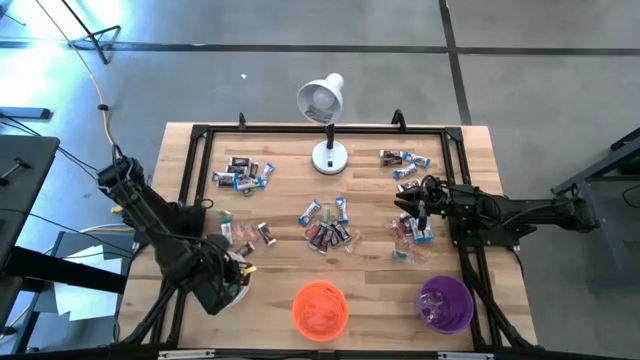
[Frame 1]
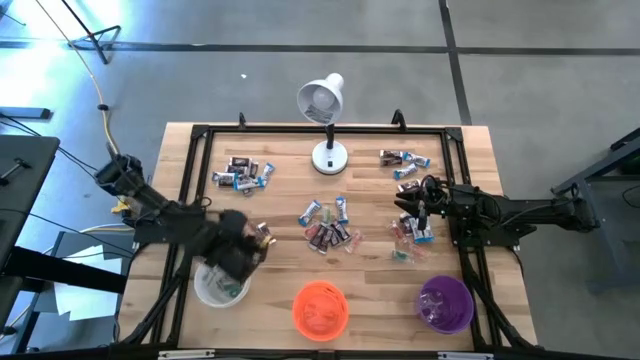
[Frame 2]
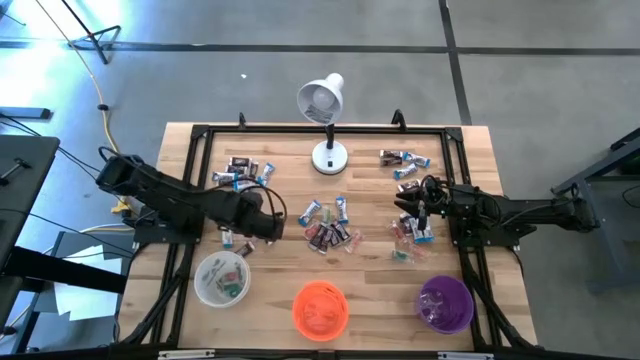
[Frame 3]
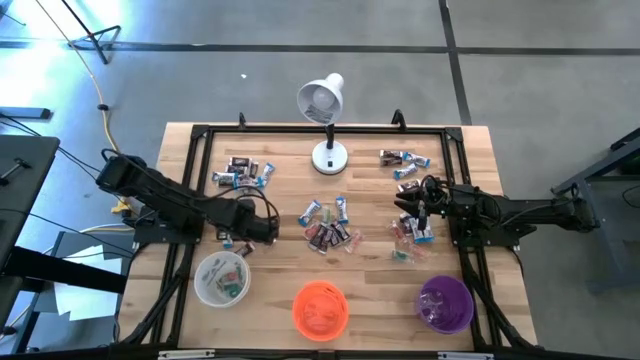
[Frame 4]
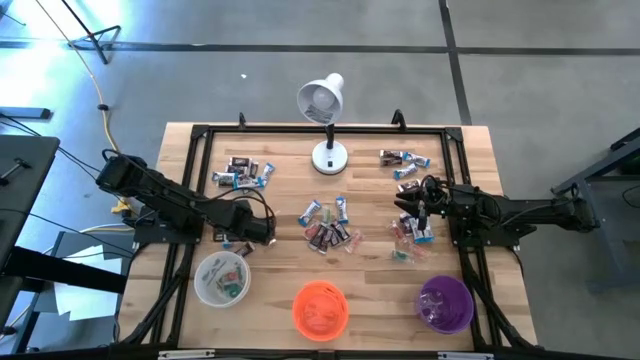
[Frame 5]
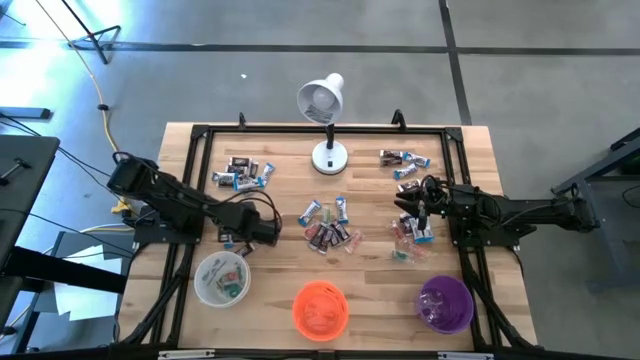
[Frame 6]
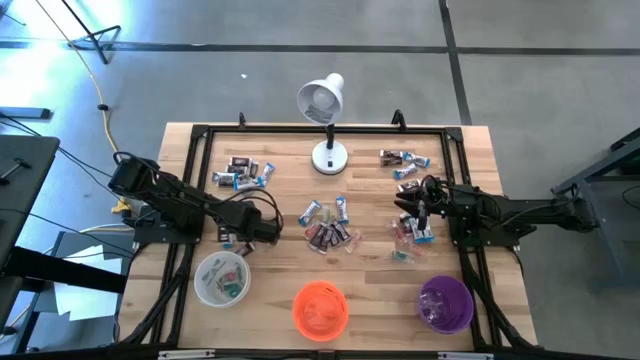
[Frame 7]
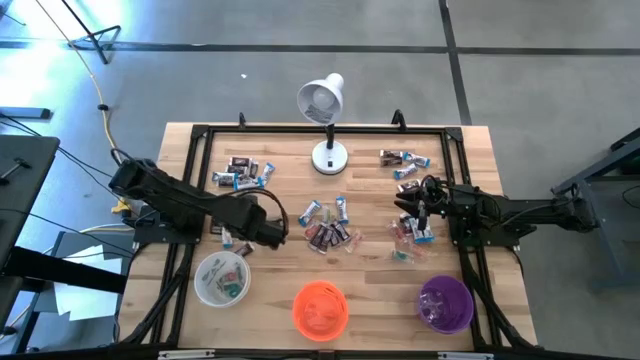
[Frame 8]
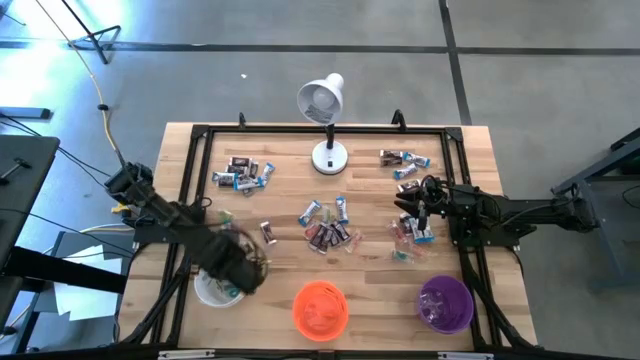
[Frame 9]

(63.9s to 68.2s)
Task: Organize candy in baskets
Put the orange gummy into the white bucket

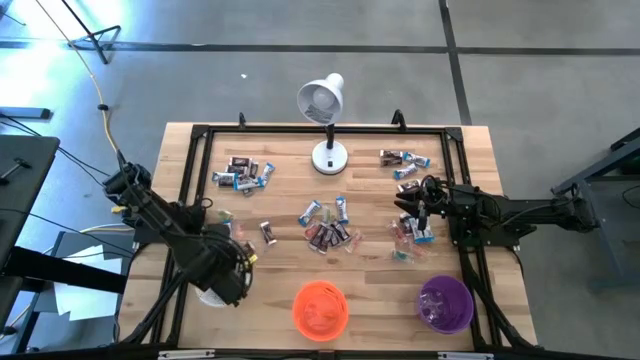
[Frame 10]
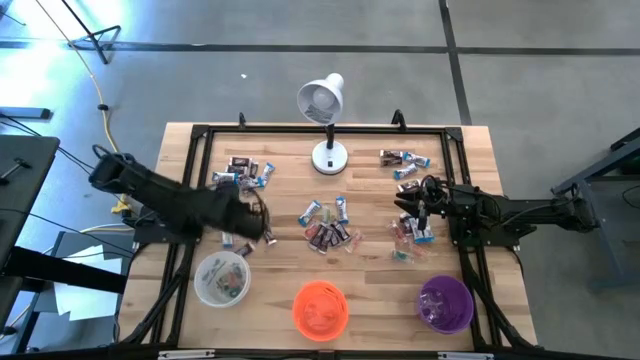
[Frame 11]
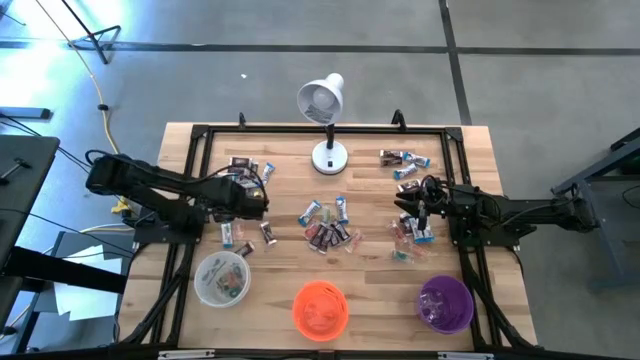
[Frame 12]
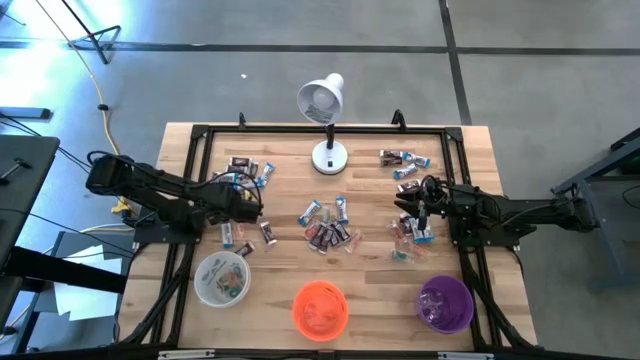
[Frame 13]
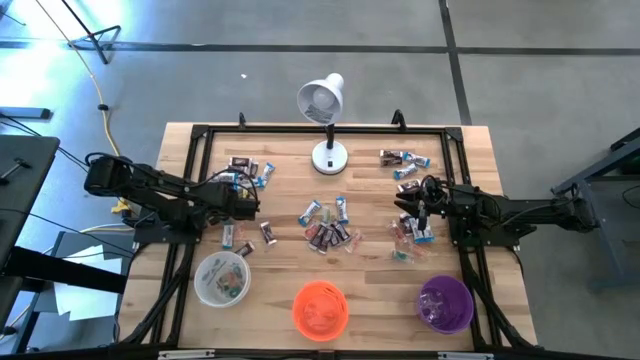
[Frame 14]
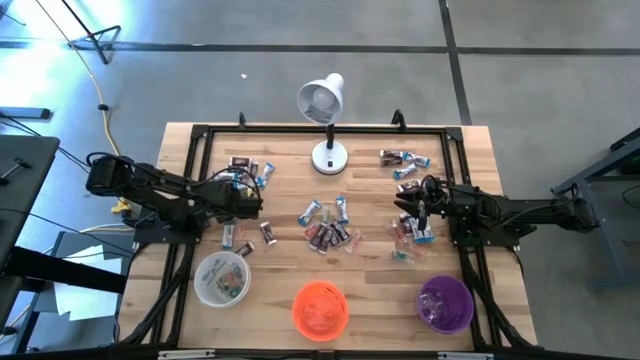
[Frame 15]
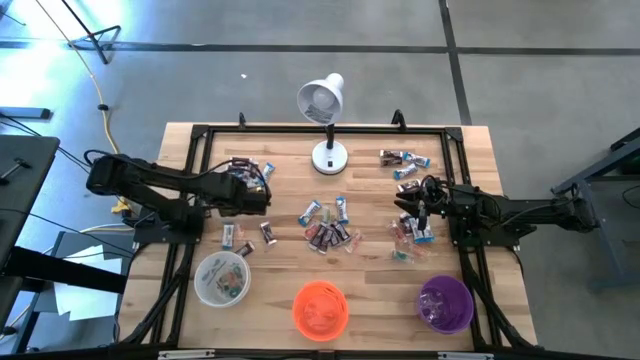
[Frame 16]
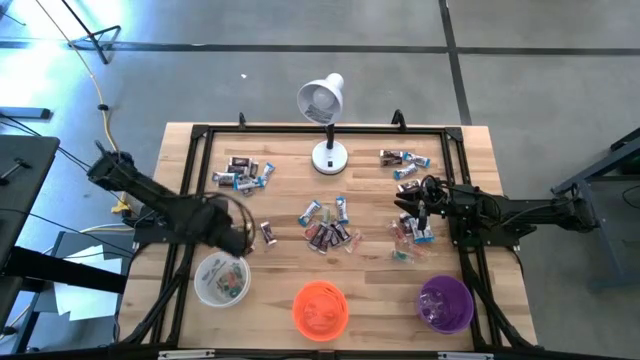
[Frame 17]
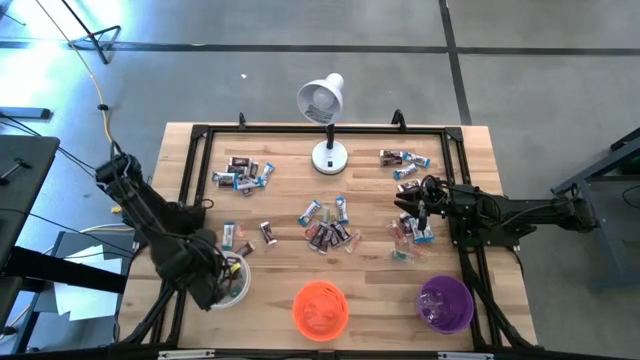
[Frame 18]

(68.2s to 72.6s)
Put the light green gummy into the white bucket

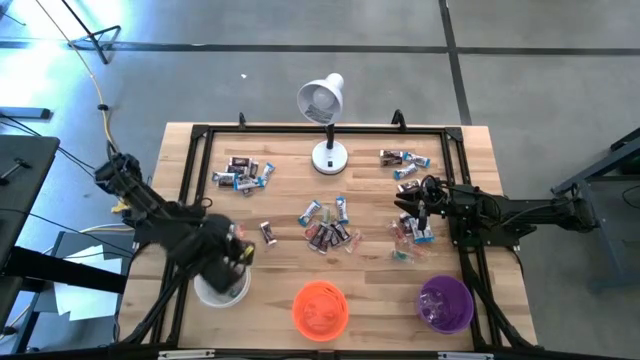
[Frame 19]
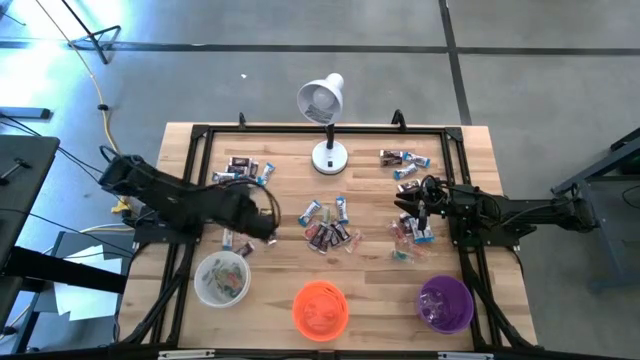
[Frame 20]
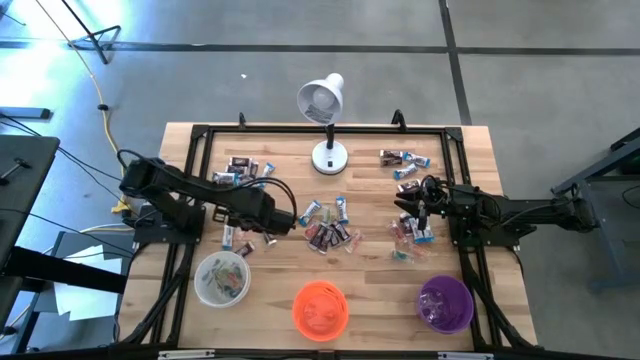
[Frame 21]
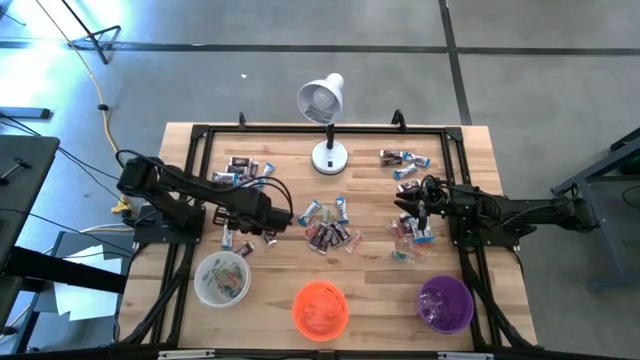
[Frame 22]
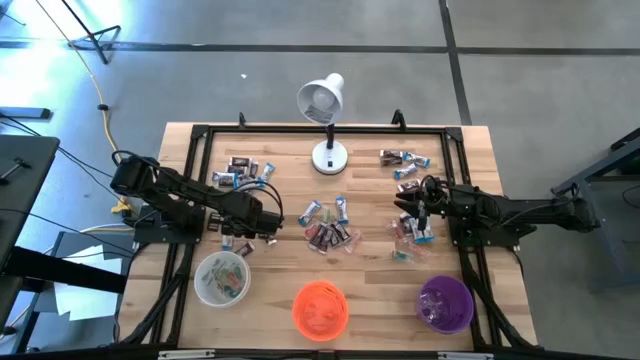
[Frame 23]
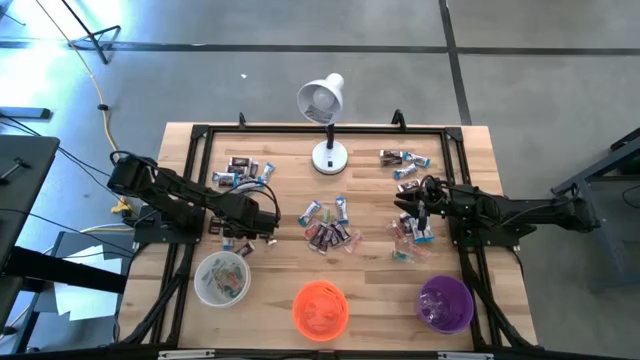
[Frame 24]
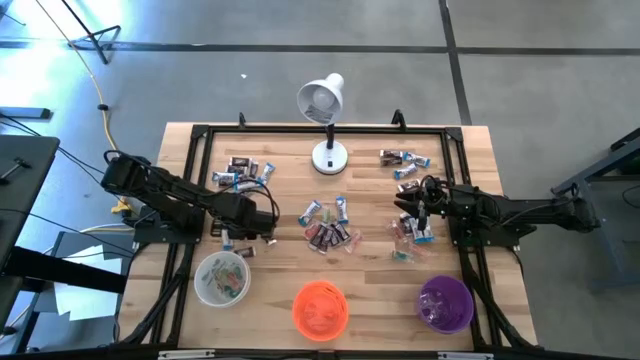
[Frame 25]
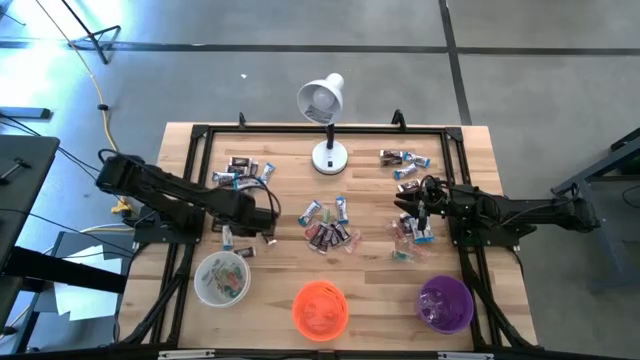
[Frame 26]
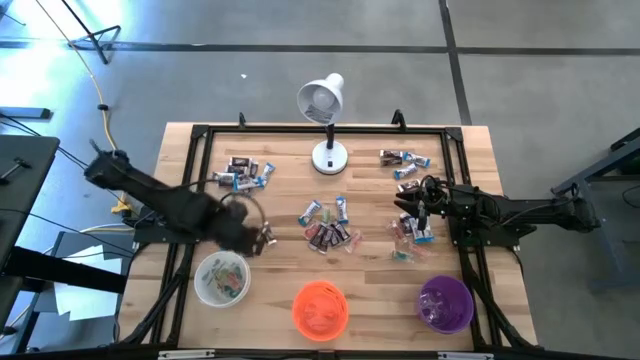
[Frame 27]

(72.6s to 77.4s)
Put the orange gummy into the white bucket

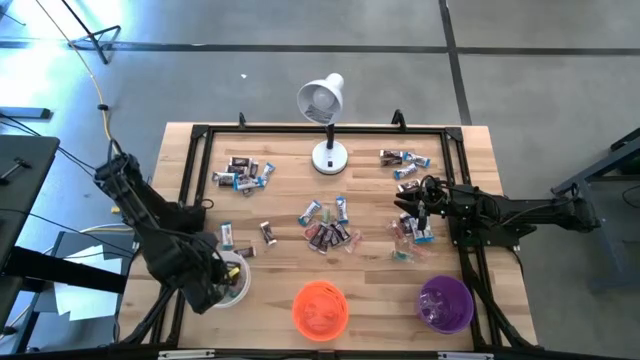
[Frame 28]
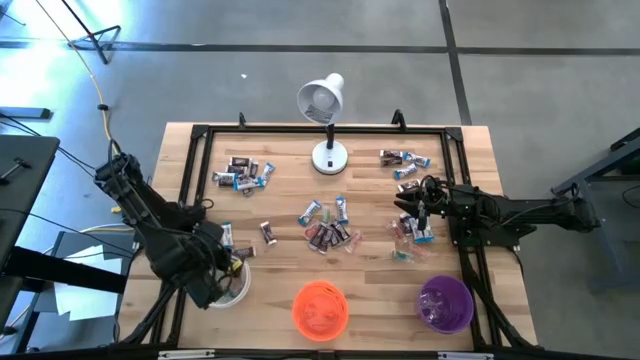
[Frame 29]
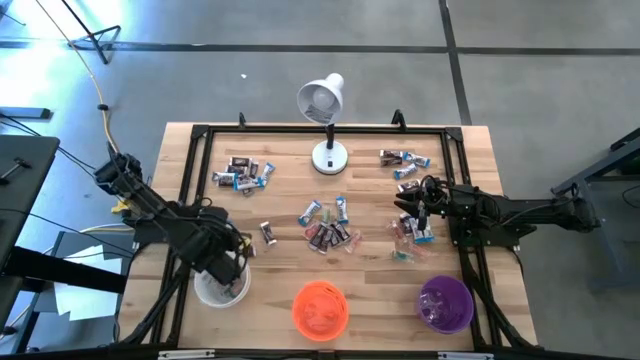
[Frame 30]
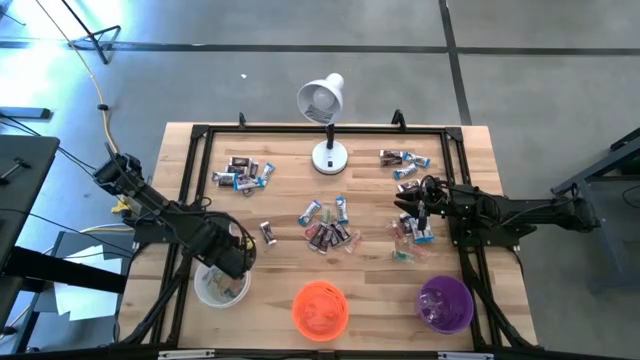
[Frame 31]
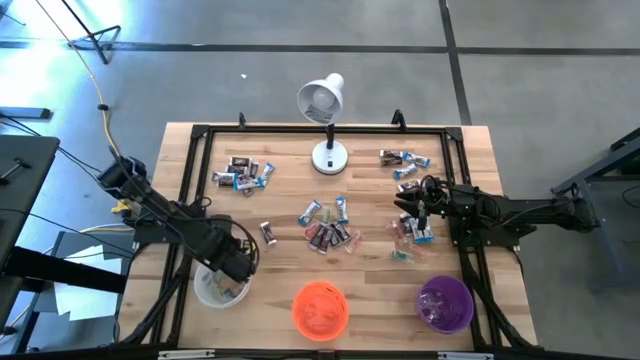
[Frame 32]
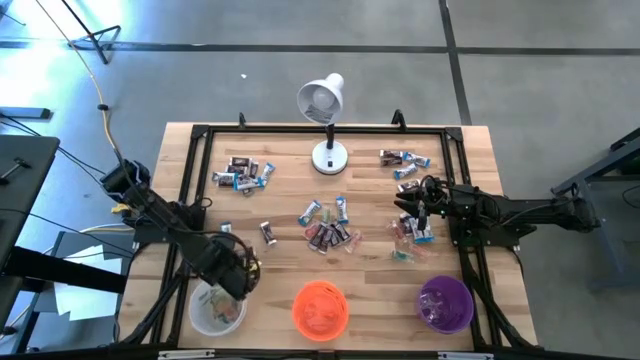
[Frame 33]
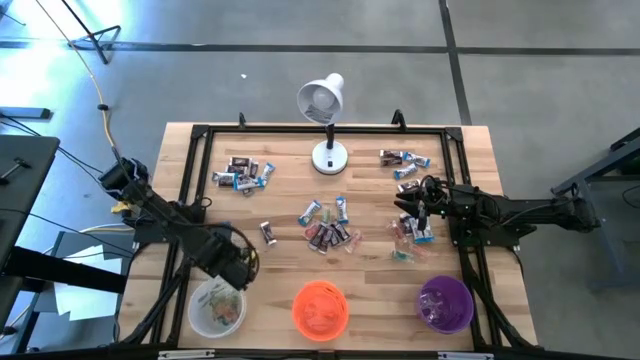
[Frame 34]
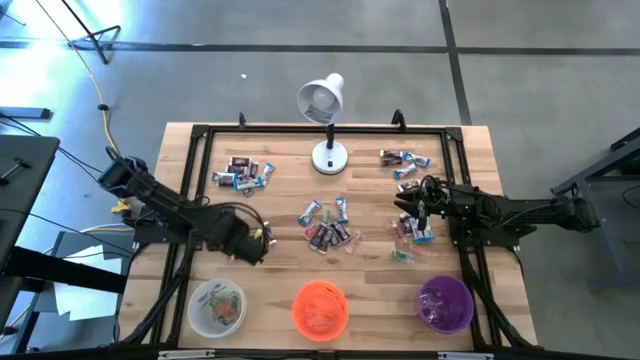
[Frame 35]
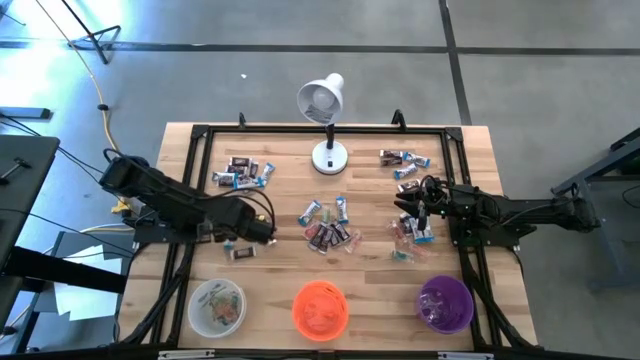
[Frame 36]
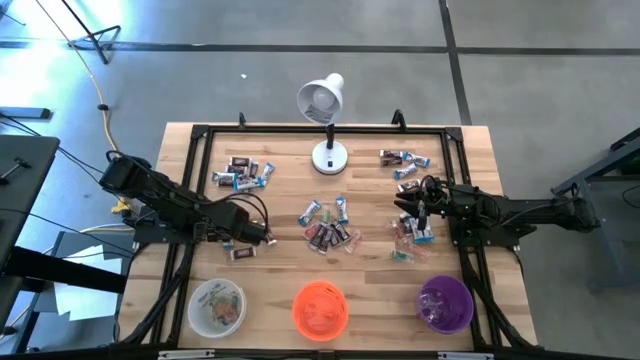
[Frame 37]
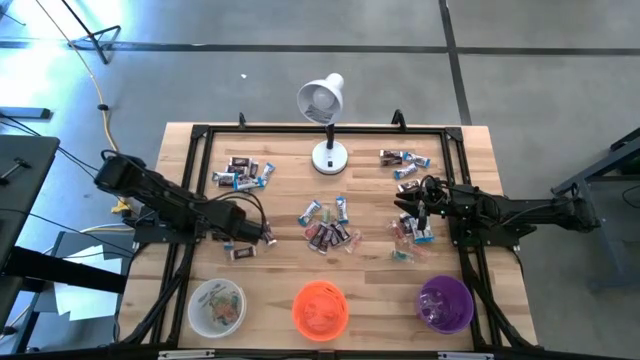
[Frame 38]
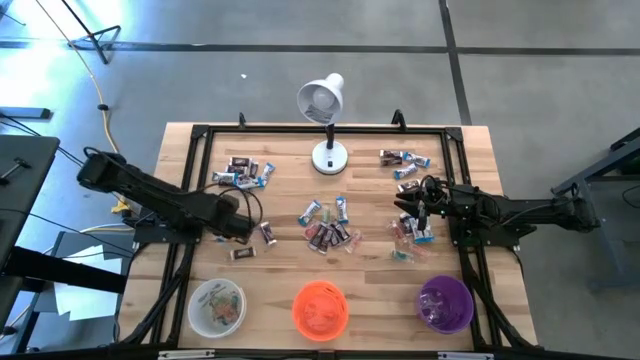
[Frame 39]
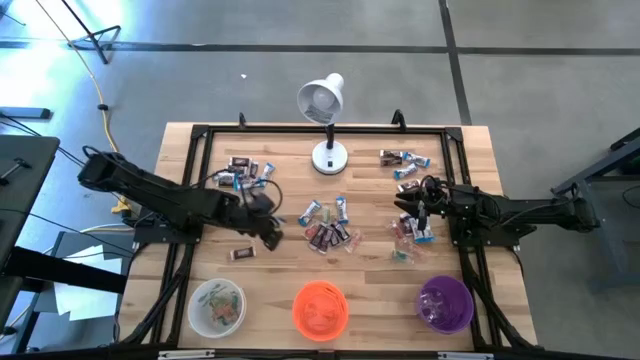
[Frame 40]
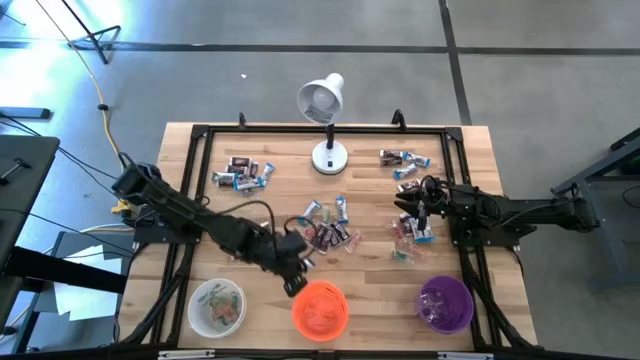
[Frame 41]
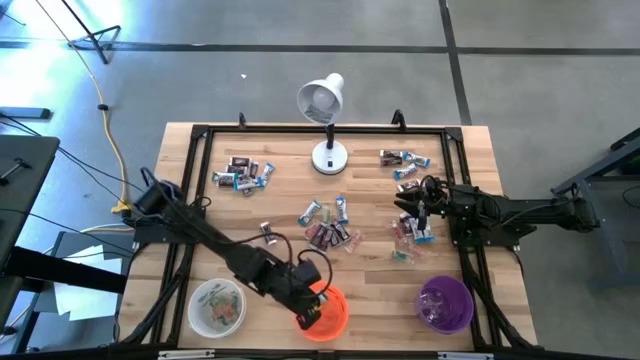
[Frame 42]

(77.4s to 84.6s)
Put the white chocolate bar into the orange bucket

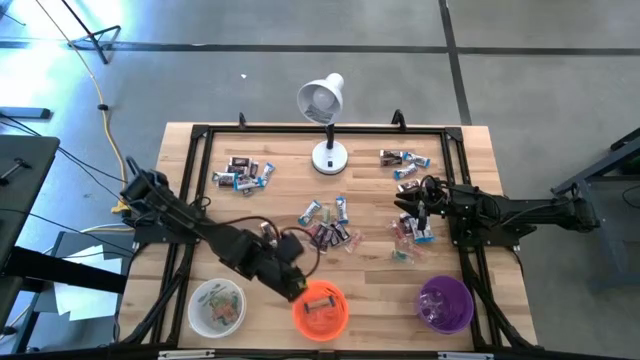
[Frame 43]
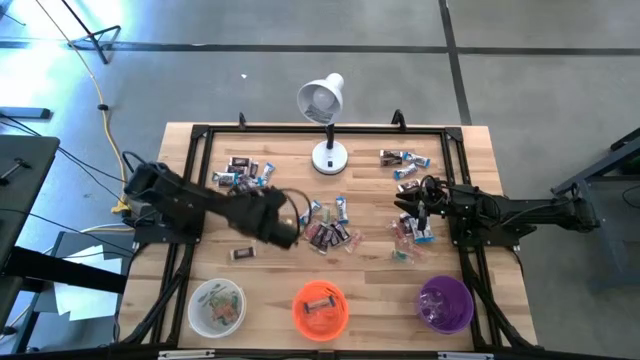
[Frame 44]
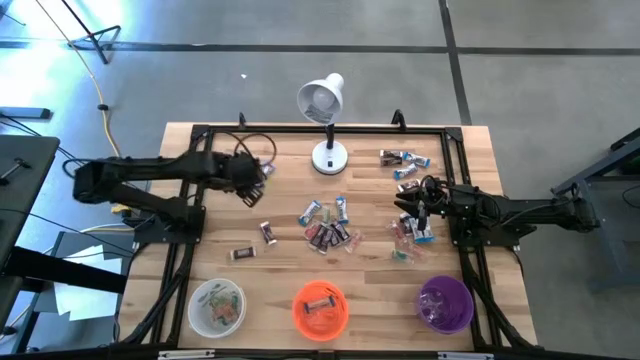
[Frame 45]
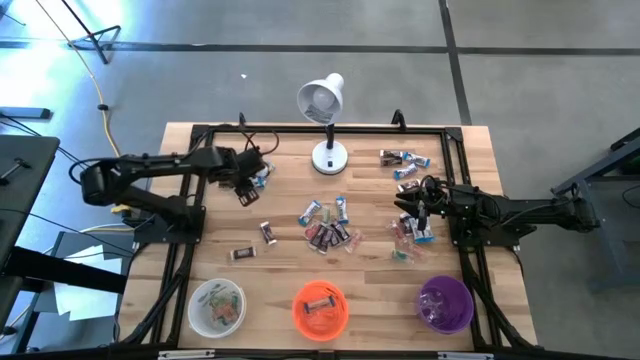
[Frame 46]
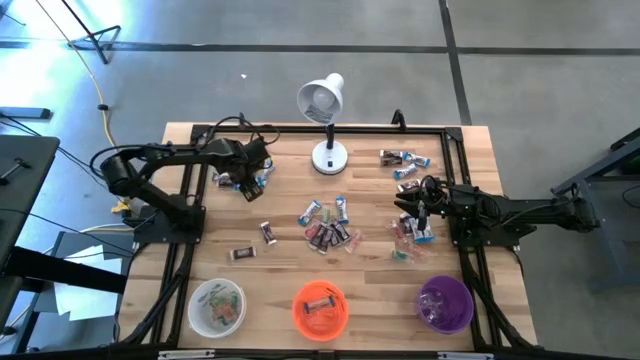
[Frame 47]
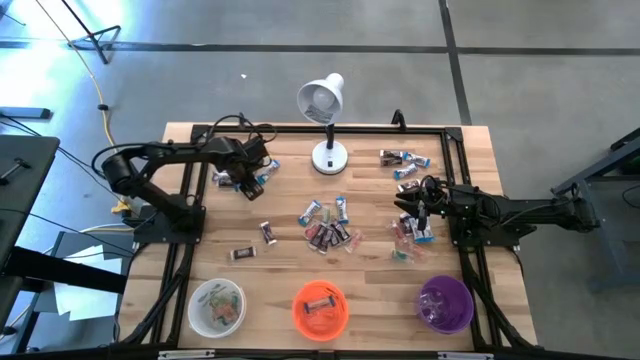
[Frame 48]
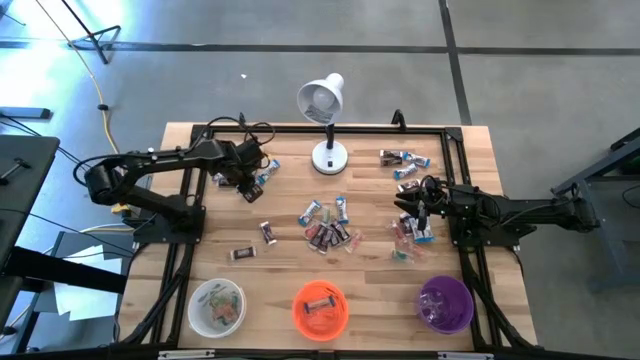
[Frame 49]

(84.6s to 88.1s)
Put the white chocolate bar into the orange bucket
